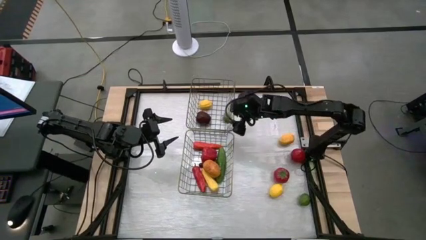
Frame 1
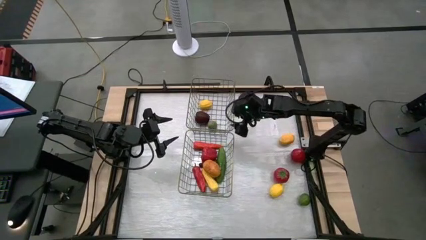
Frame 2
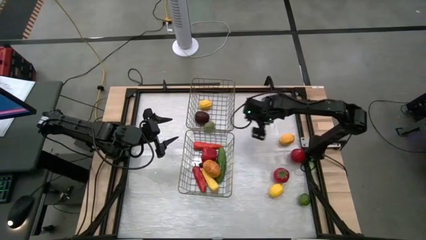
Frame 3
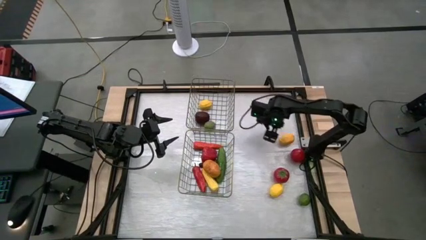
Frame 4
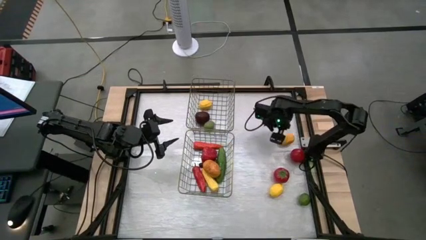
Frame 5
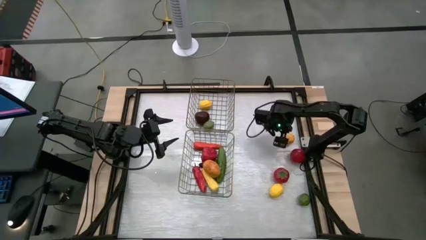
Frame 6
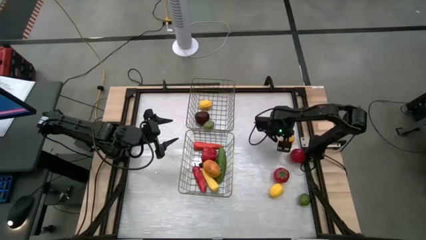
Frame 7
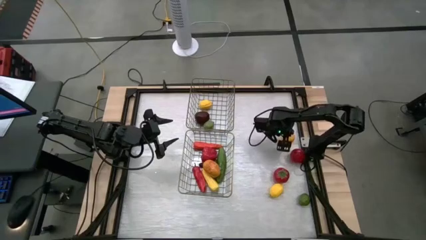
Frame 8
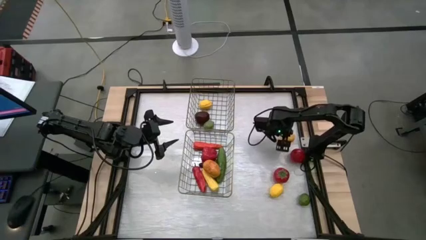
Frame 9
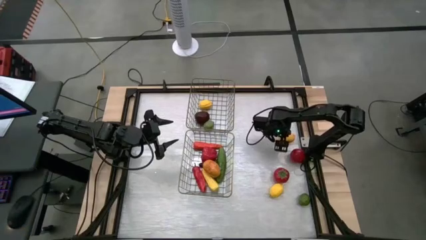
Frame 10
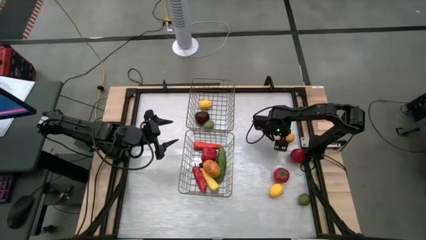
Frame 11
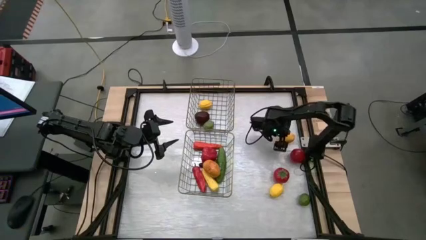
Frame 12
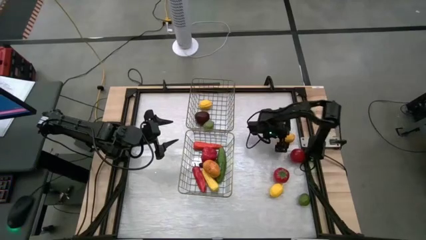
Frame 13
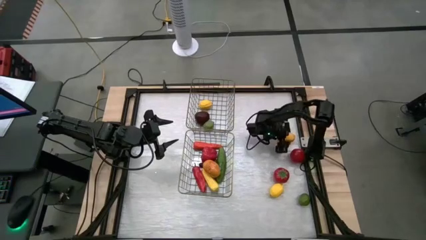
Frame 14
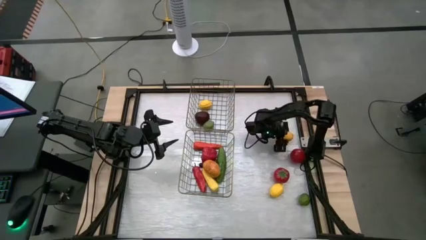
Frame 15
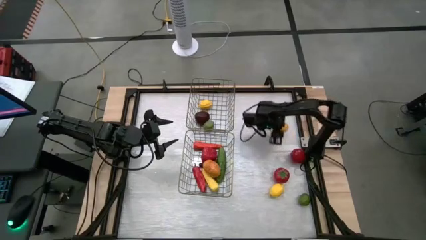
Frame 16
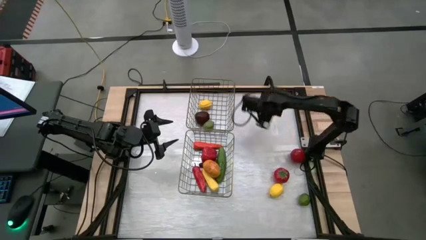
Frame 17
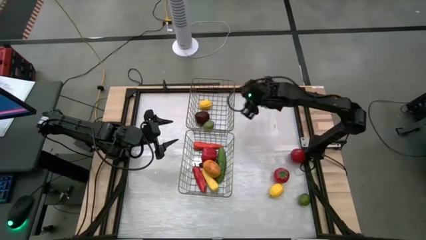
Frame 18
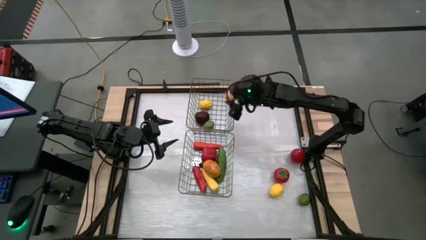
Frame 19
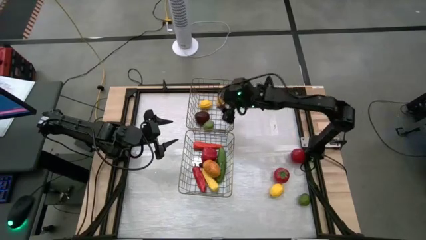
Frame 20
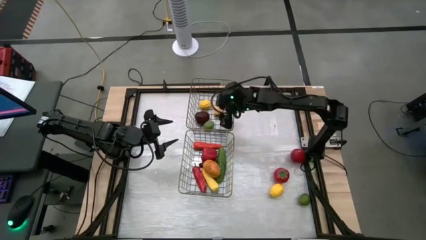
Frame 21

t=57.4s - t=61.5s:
Task: Sort produce into baskets
Put the top yellow lemon into the top wire basket

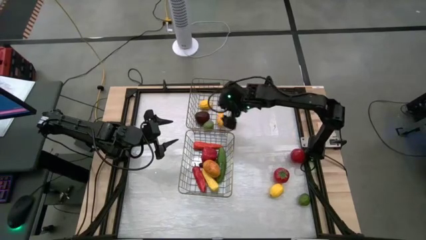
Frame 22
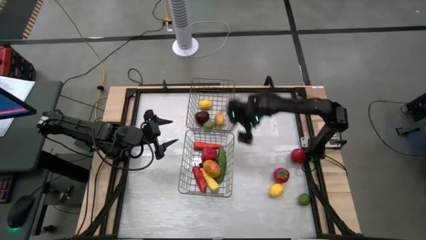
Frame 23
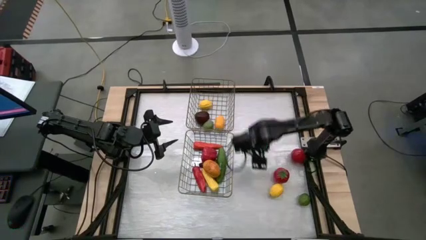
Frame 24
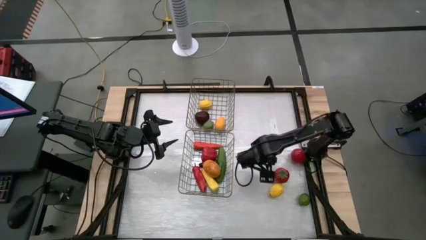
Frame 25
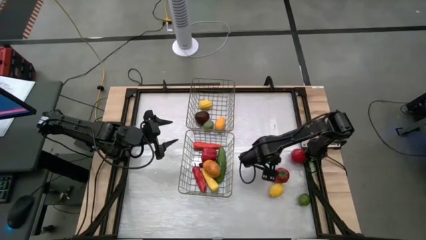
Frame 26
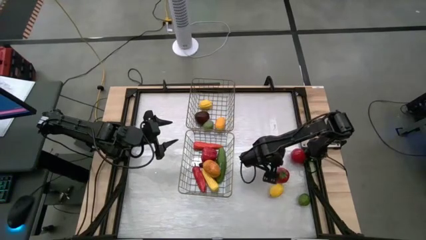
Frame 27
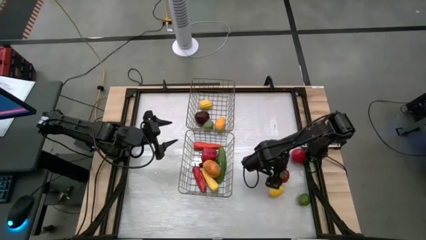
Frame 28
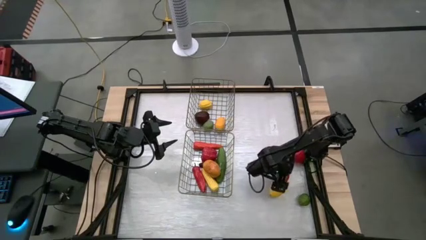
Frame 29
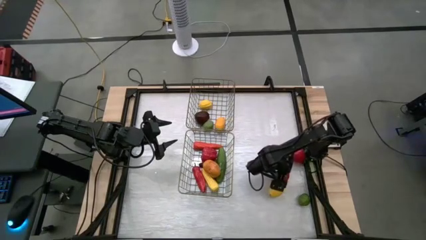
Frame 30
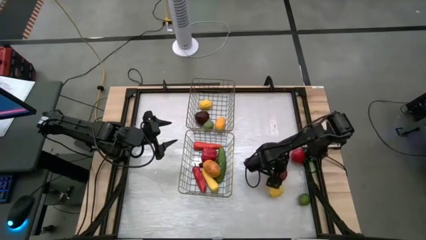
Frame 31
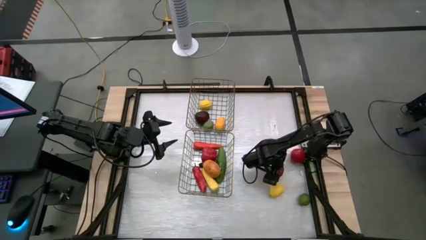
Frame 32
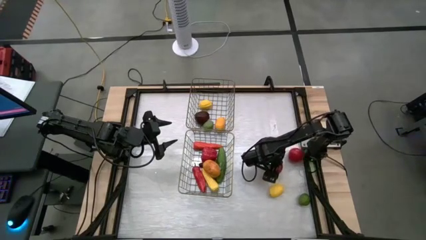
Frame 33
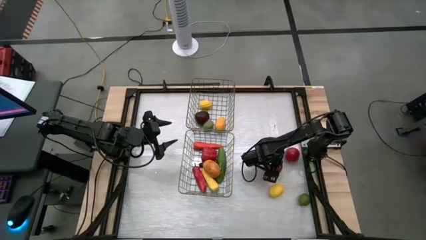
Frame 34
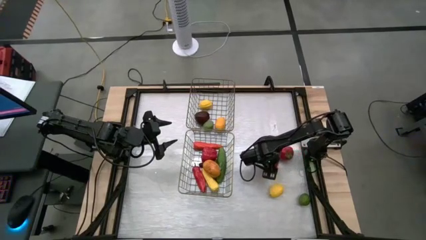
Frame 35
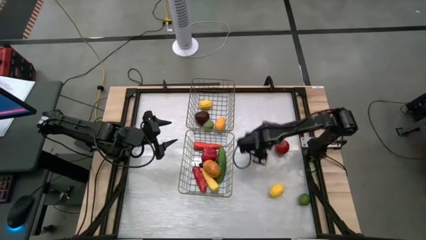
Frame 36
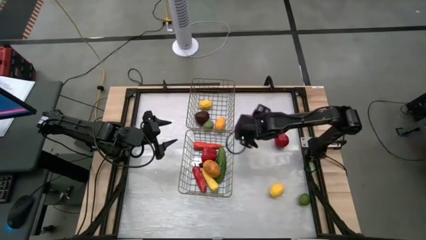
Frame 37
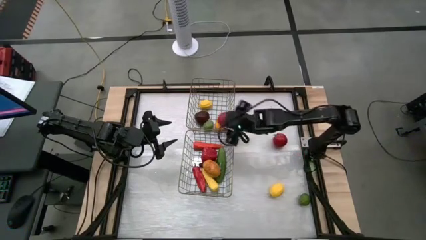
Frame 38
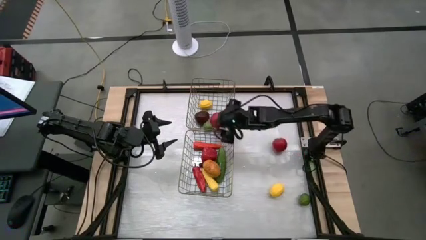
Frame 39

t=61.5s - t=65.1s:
Put the bottom red tomato in the top wire basket

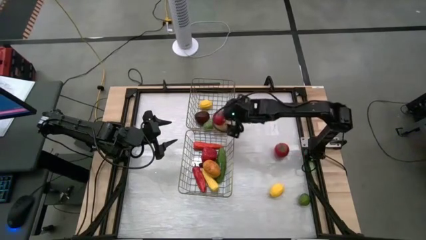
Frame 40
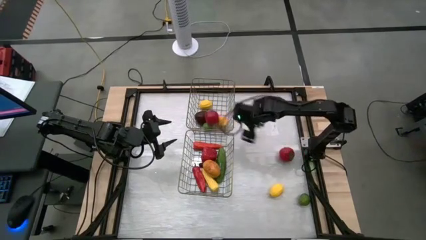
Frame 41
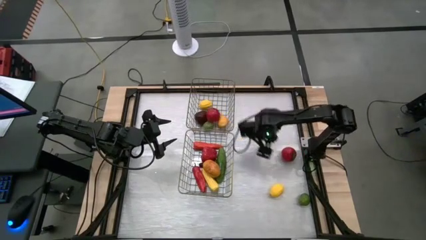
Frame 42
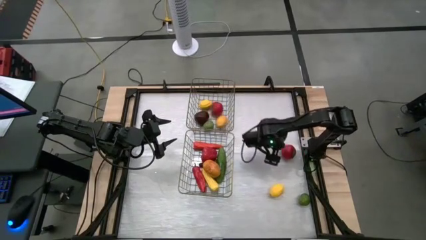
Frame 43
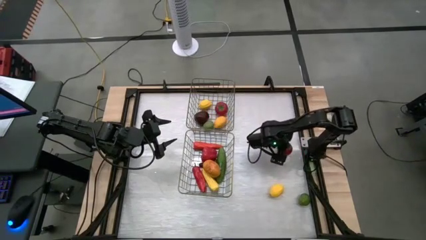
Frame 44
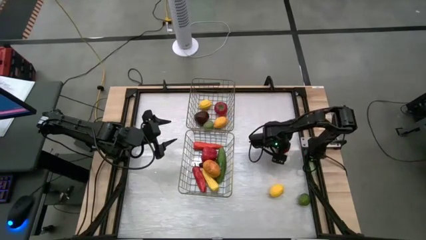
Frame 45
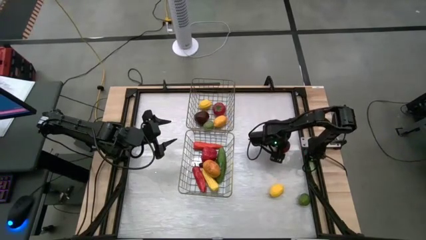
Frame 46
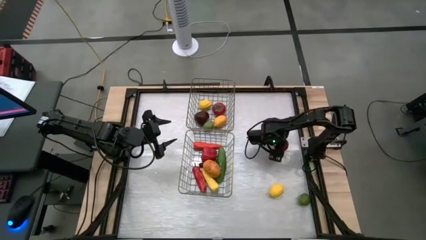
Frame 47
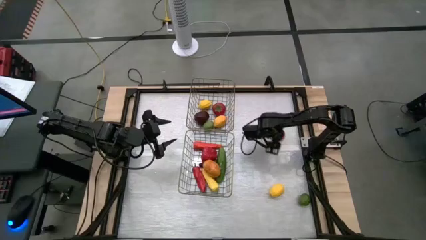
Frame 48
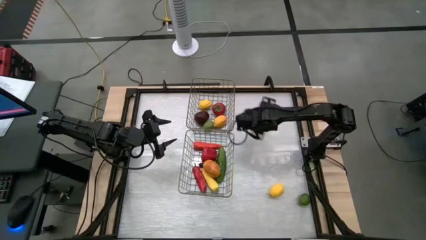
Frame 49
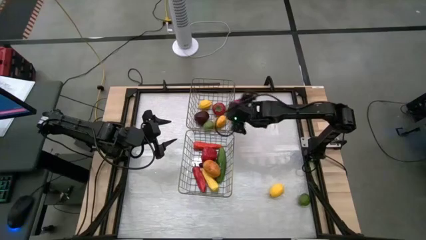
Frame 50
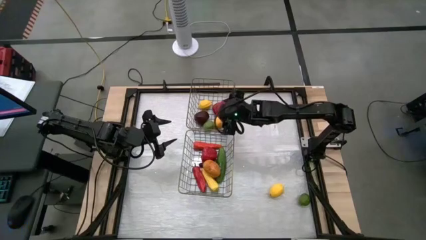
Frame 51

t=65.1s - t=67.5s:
Put the red tomato in the top wire basket

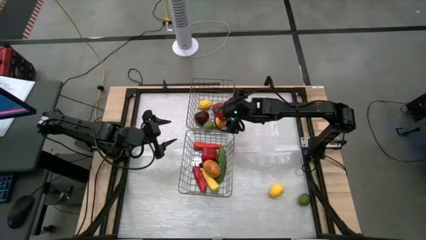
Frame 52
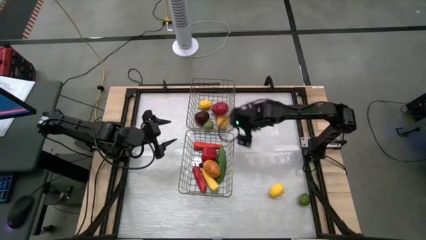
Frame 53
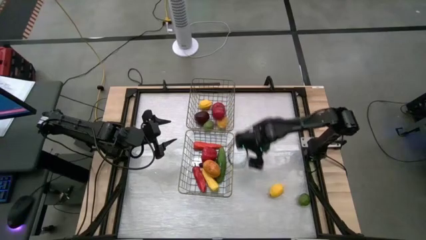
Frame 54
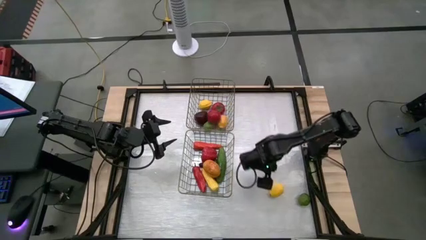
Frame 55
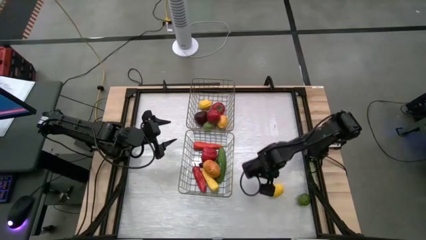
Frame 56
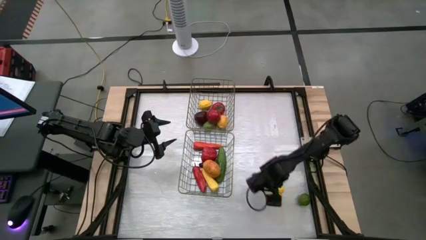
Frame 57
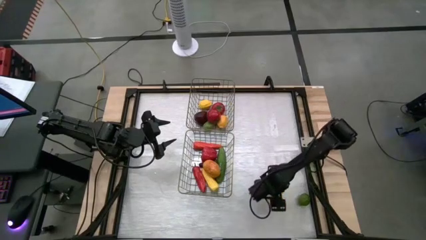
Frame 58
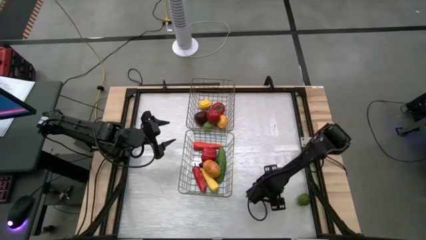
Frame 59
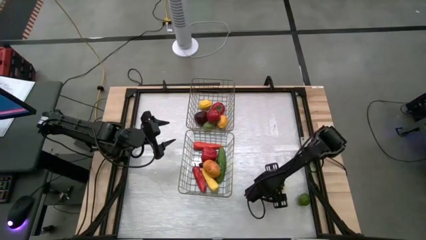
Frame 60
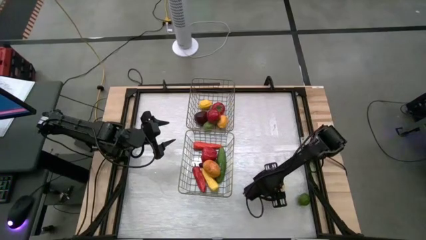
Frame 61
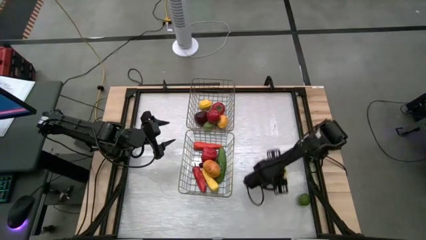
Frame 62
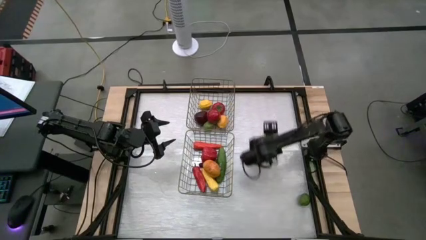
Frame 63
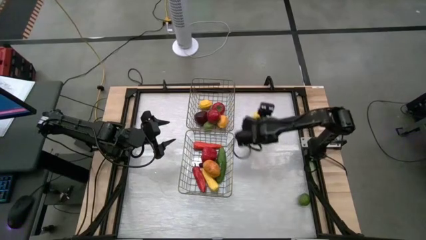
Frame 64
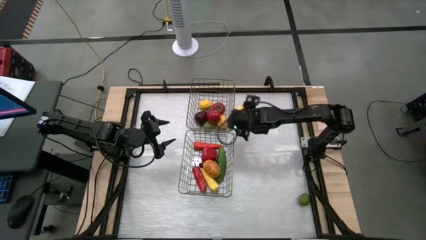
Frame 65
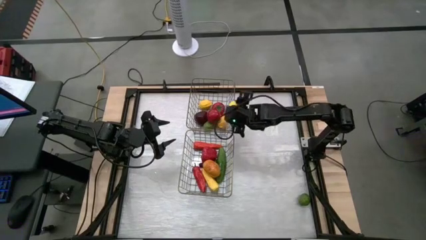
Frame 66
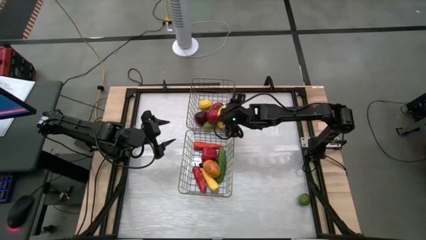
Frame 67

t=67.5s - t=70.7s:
Put the yellow lemon into the top wire basket

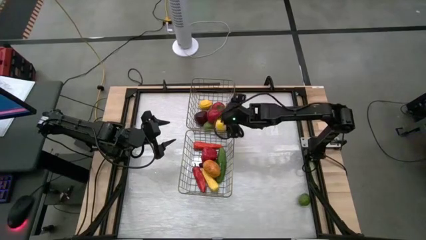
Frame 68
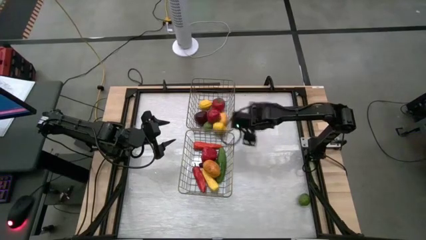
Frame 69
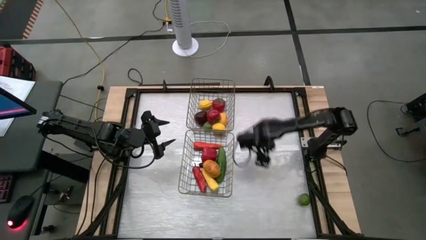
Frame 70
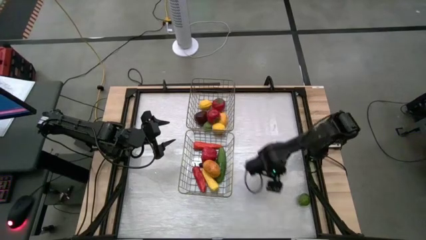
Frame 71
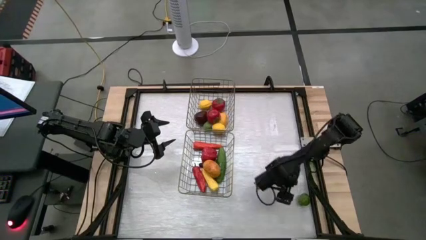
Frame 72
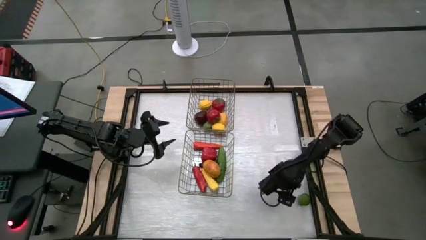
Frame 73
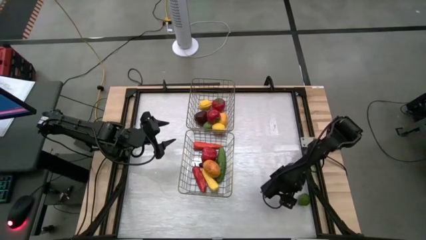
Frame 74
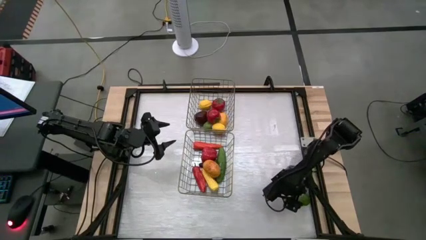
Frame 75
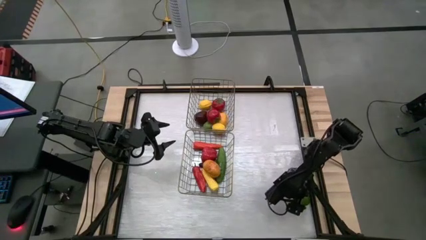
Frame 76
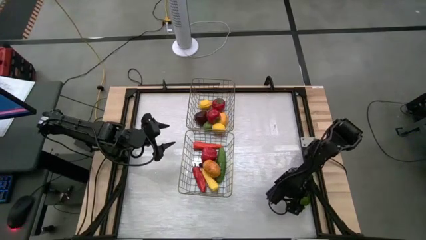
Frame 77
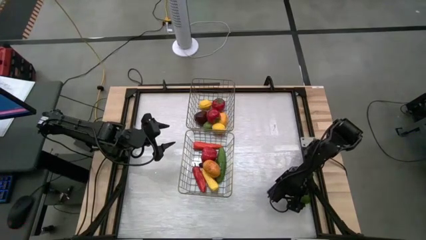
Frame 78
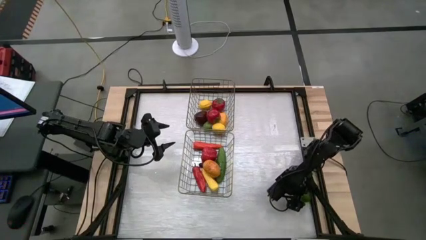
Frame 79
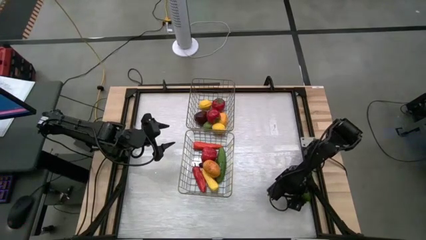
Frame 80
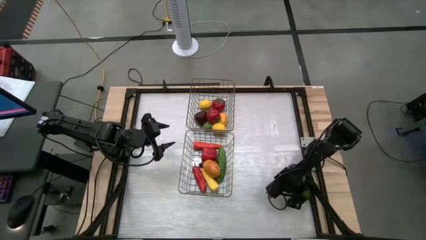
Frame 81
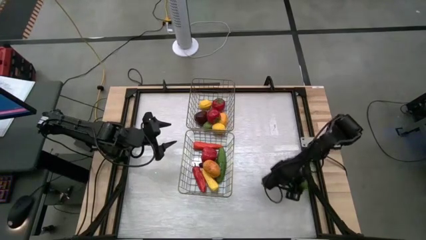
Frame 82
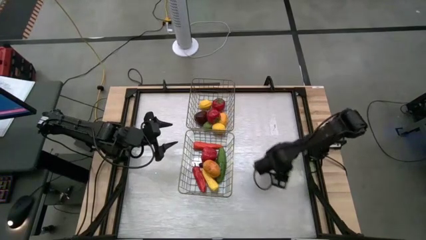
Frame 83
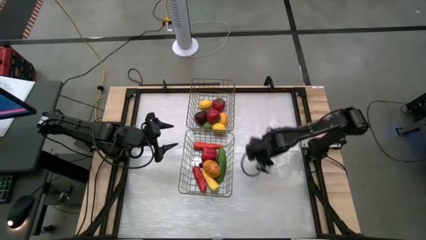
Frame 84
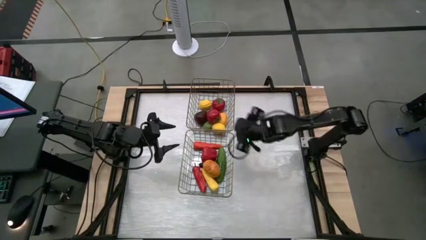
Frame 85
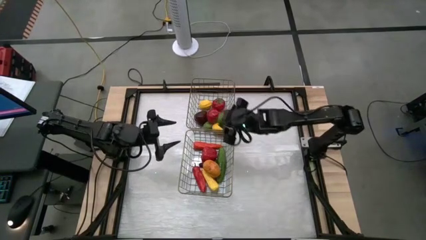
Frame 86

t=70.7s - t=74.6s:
Put the green lime into the top wire basket
